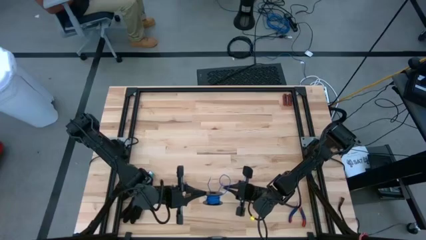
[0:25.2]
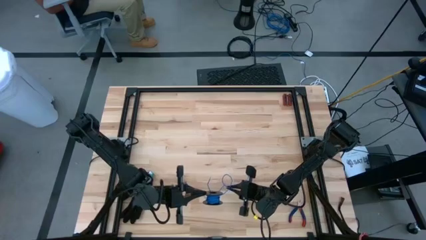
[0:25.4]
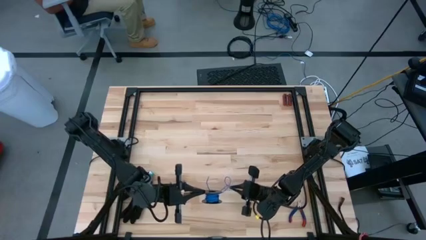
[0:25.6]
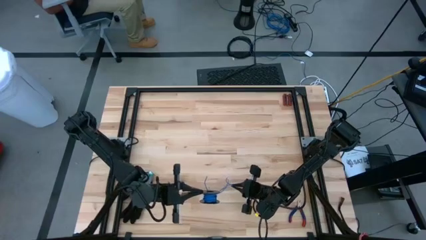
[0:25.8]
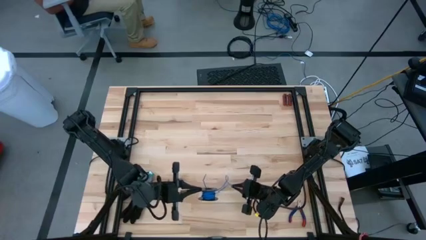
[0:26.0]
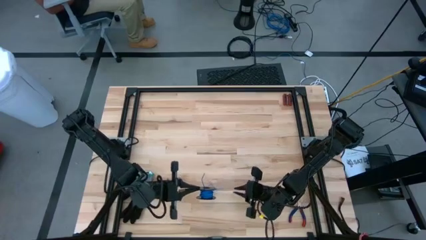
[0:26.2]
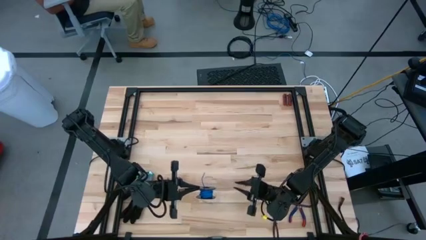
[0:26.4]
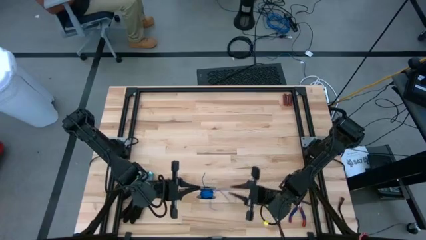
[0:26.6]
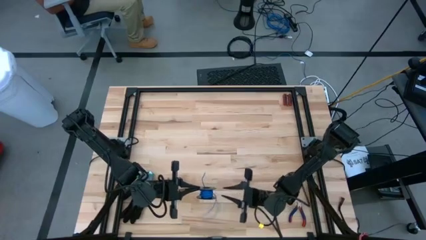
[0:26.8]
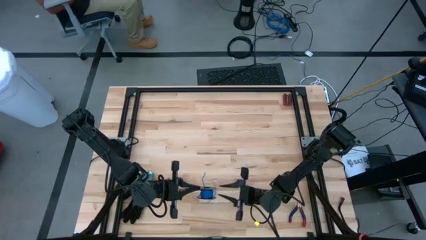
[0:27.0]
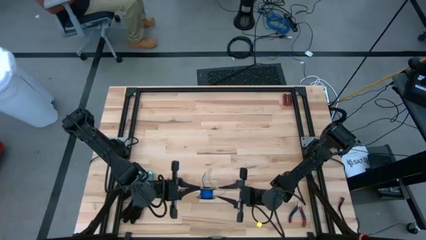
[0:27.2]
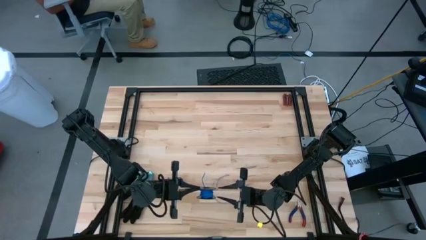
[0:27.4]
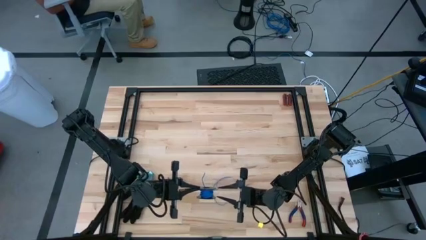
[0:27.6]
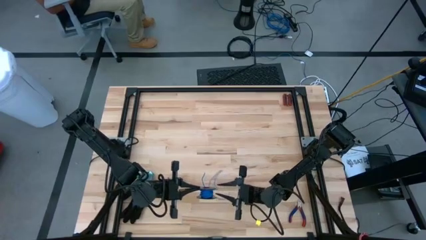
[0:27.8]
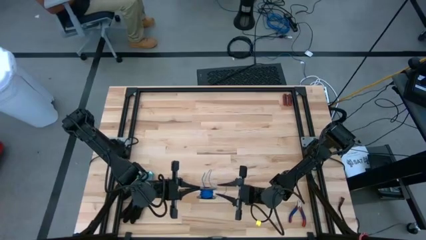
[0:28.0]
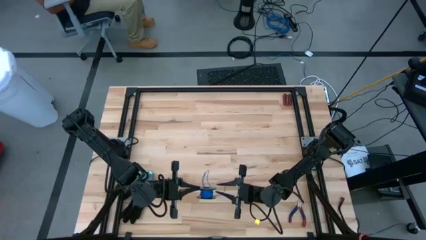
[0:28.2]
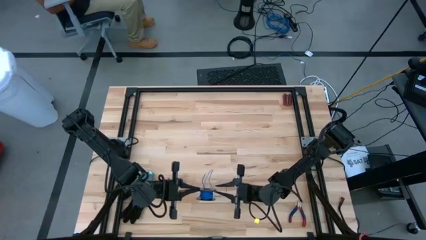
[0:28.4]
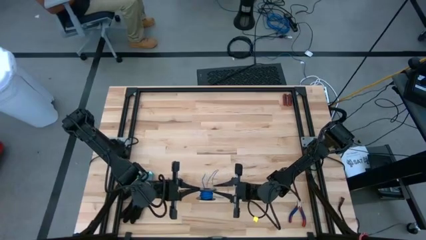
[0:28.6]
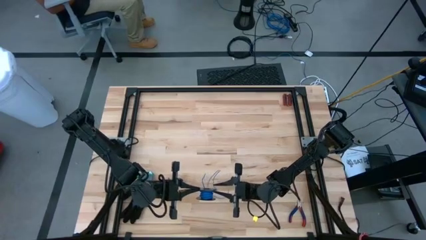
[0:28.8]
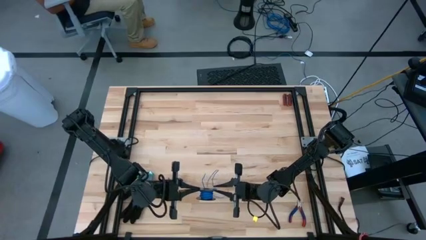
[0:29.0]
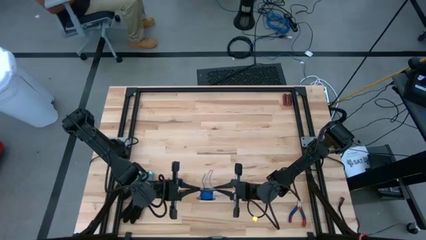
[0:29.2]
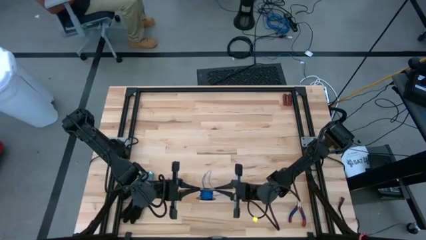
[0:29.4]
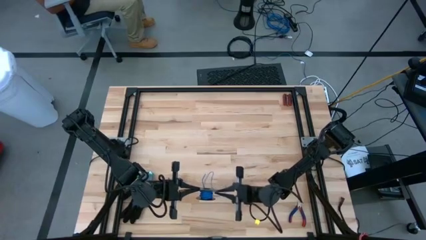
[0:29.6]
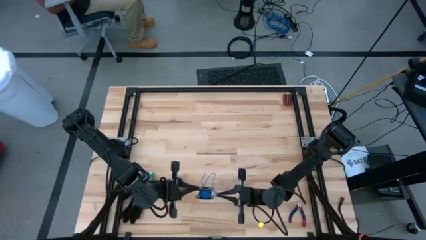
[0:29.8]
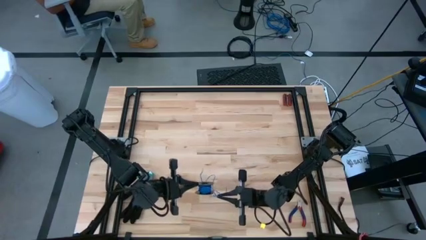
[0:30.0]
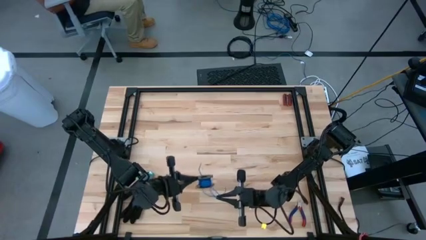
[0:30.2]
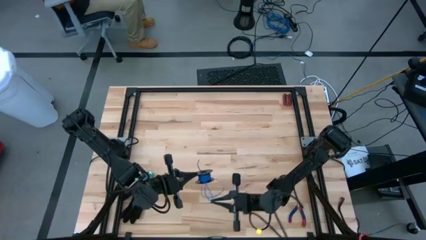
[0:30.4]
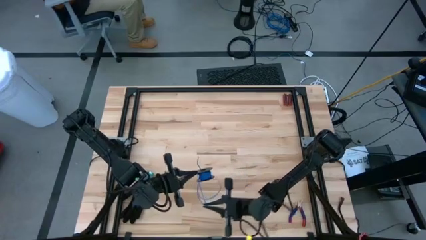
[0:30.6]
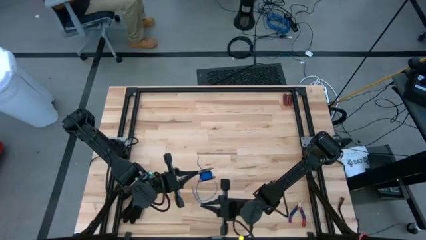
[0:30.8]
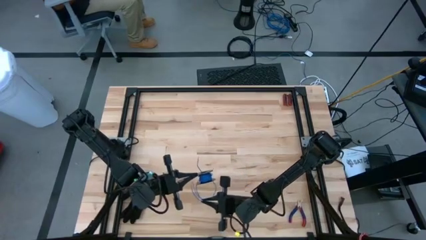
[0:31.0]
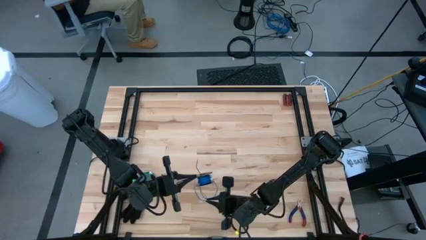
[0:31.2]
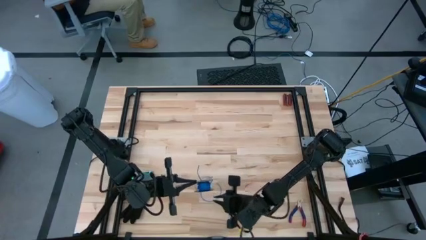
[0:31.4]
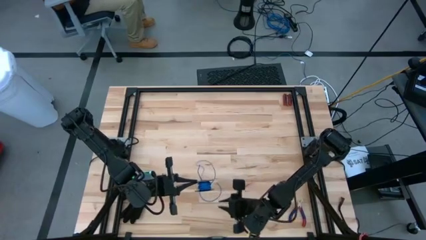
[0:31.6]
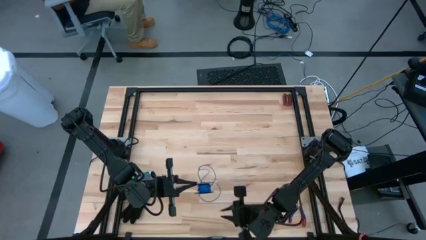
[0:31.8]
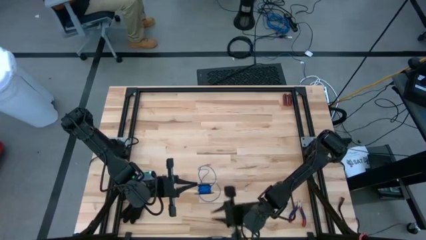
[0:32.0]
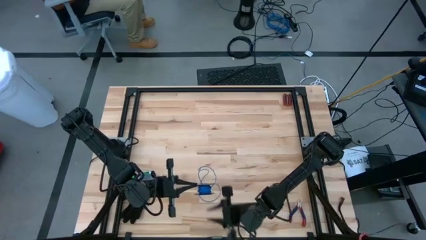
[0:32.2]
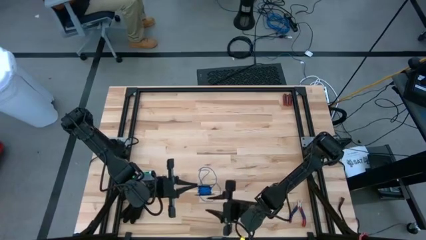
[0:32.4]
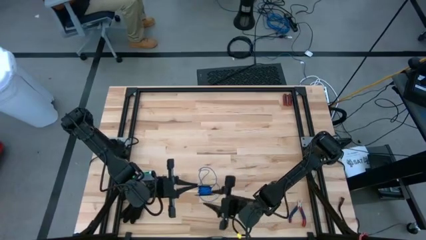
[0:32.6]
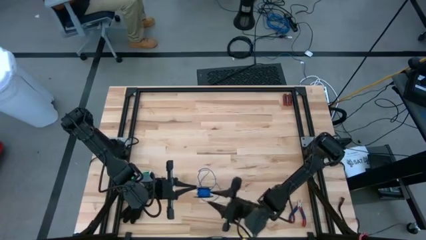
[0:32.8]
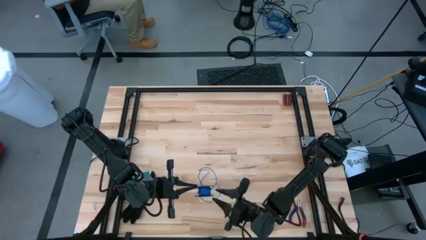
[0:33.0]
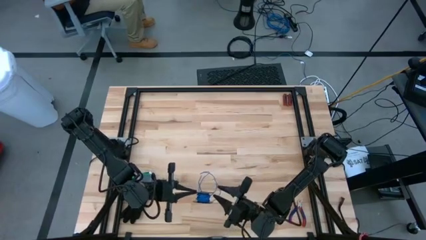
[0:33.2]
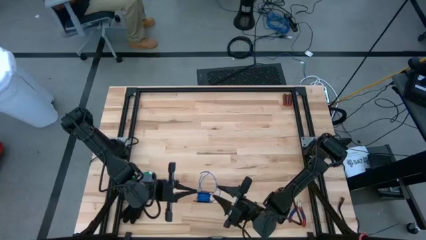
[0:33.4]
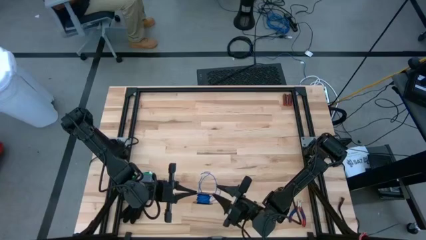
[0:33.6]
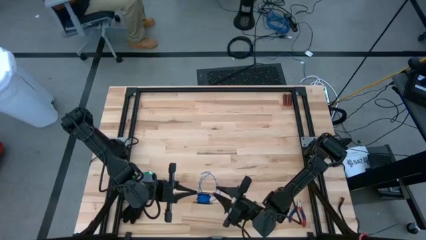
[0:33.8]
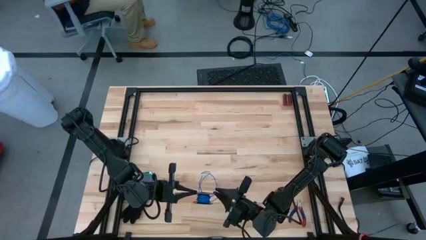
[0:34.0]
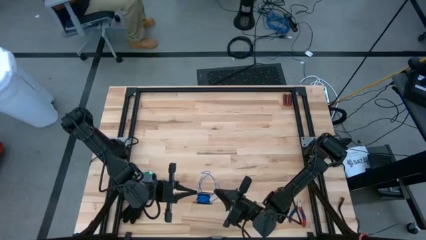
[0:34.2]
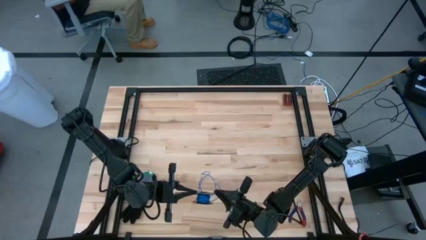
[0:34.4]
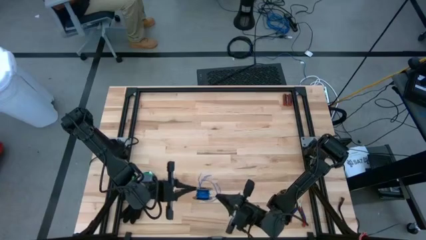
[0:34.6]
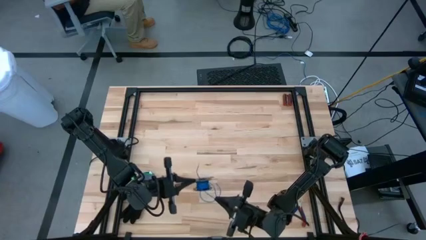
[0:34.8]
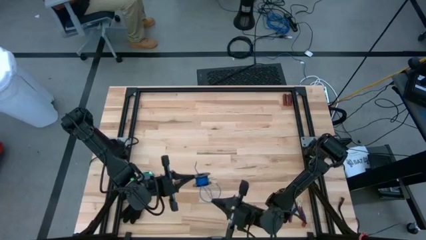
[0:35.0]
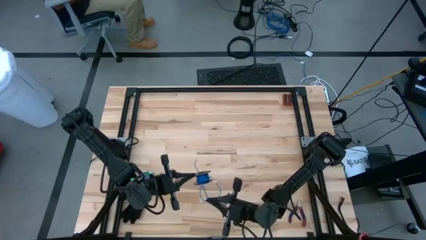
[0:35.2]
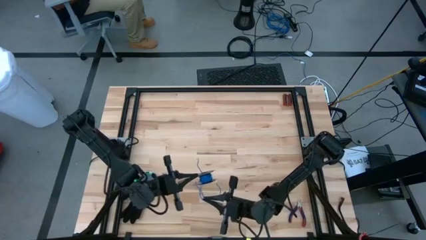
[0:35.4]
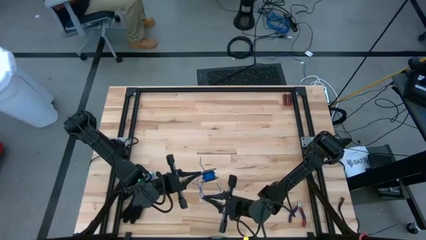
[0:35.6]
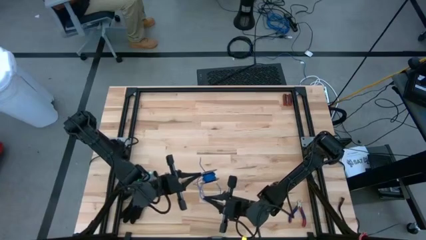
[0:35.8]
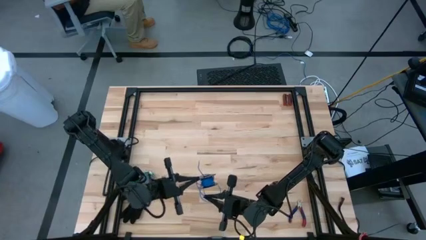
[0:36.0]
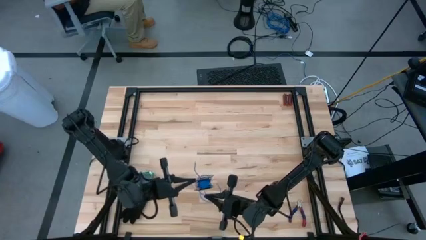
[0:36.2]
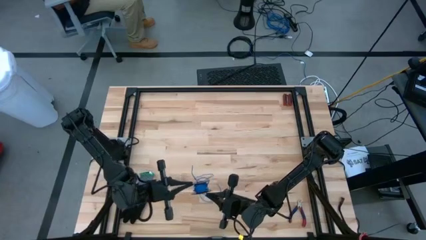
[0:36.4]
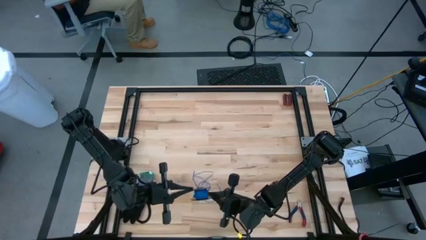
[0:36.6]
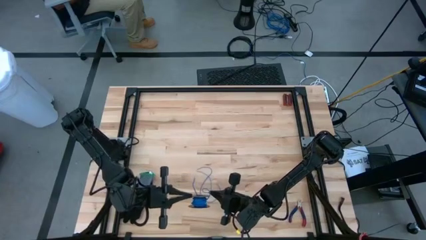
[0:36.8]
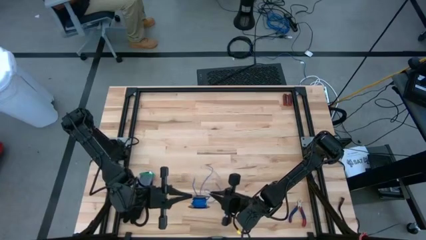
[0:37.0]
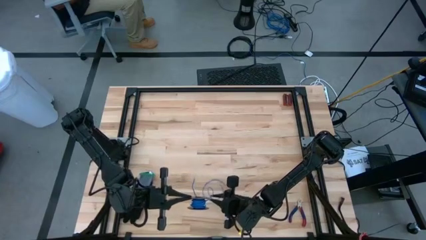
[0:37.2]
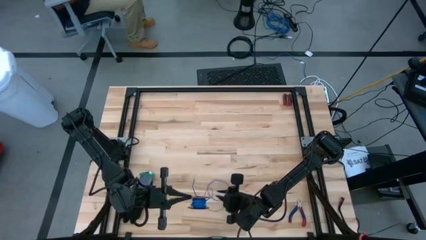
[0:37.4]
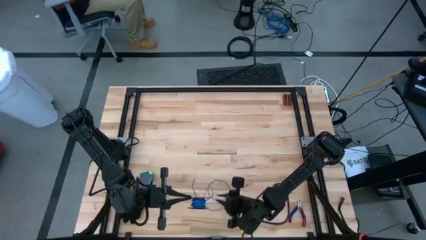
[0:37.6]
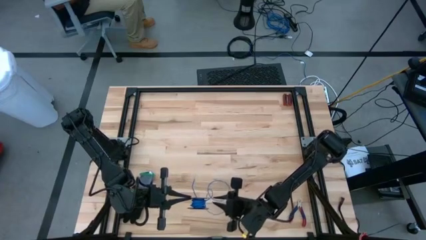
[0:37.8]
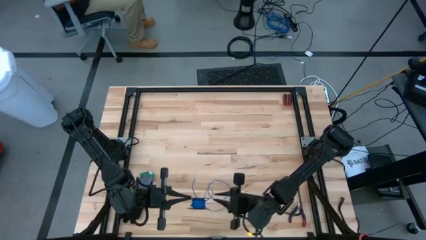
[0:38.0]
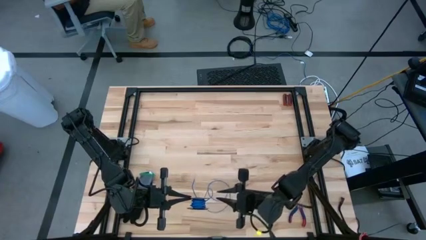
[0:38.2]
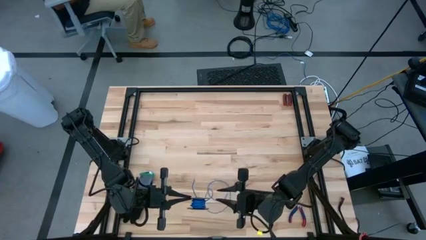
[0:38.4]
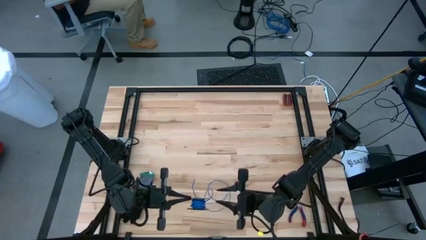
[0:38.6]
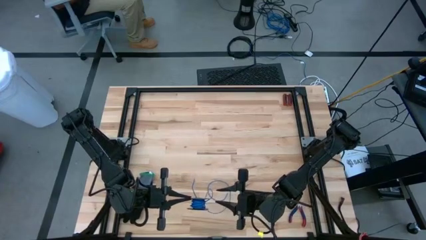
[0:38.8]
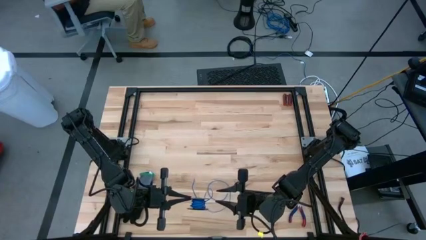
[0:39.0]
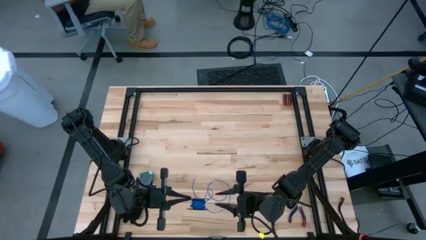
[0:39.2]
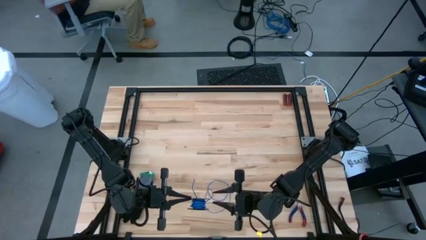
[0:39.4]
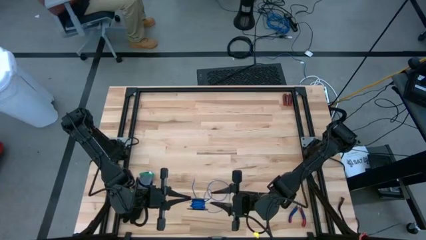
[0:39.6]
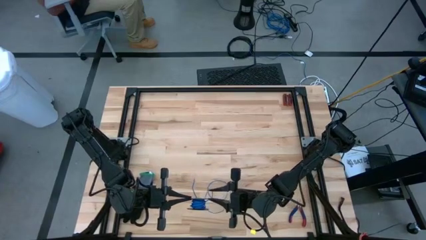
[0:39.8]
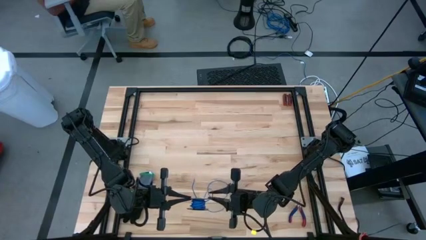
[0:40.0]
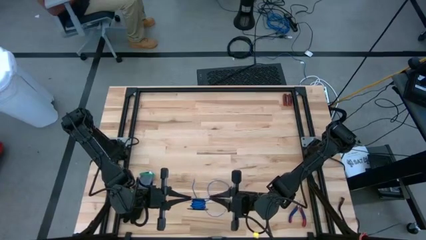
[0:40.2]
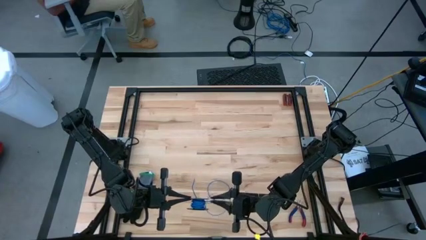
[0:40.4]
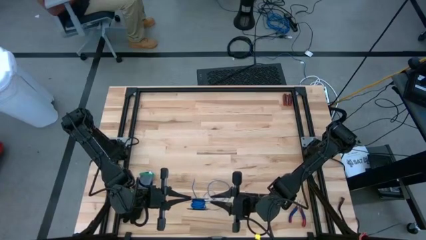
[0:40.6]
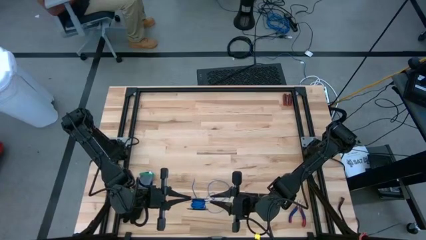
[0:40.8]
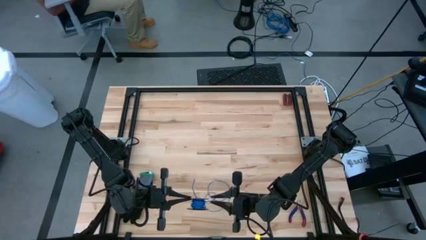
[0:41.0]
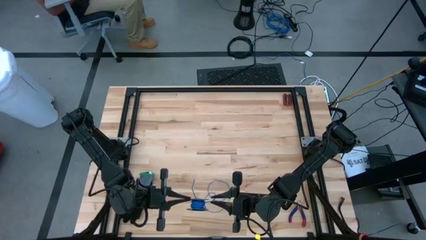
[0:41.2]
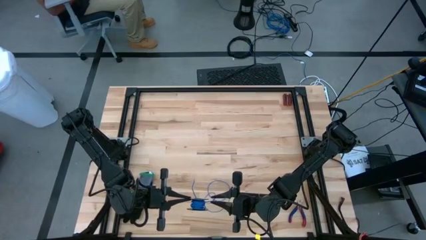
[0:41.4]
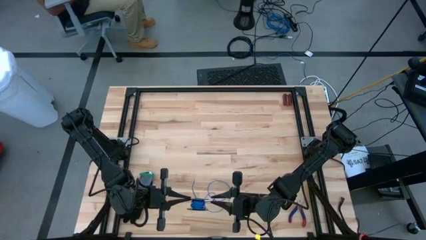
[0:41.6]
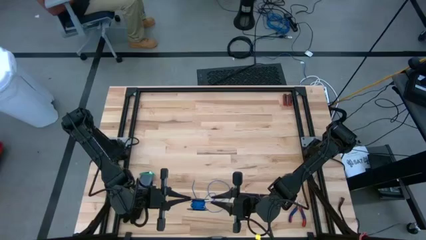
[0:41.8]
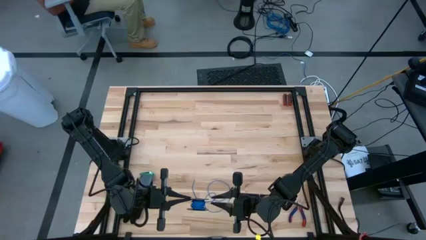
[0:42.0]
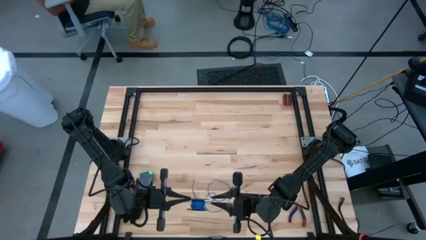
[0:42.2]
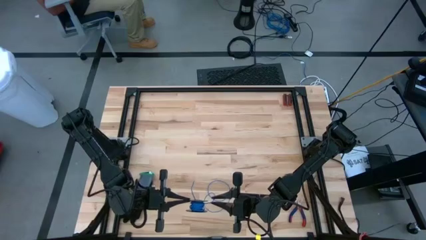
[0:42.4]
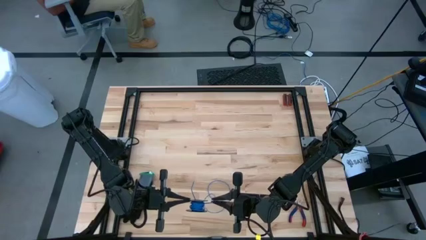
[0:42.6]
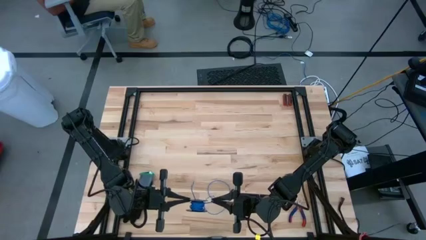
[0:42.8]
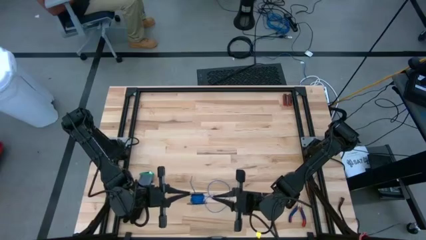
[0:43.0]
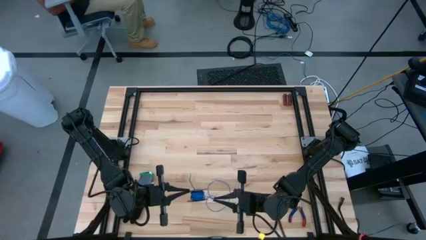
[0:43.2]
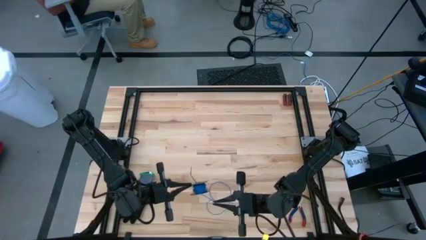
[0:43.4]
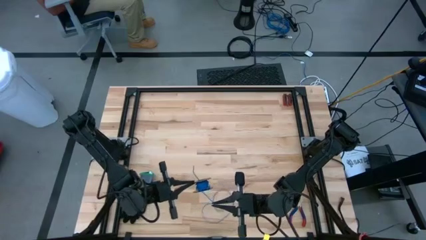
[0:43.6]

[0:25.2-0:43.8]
Task: Coil cords
Uncoil the blue wire from the spool
